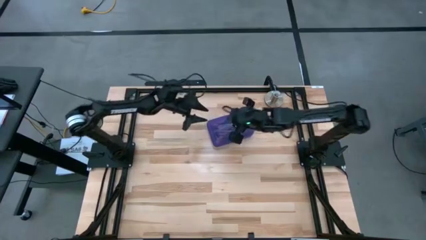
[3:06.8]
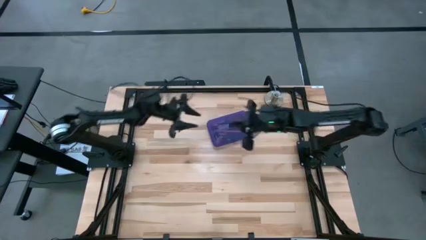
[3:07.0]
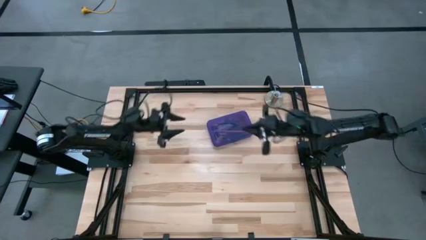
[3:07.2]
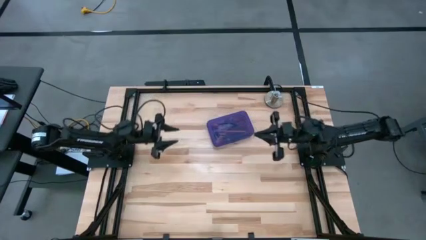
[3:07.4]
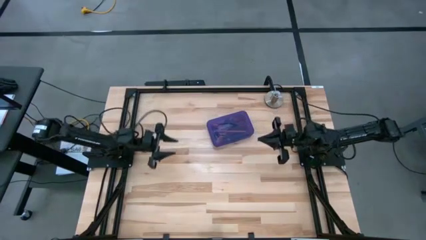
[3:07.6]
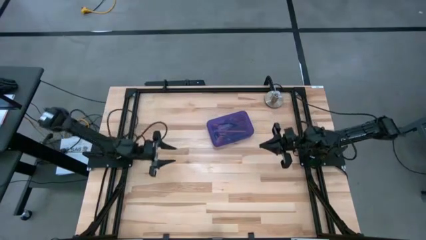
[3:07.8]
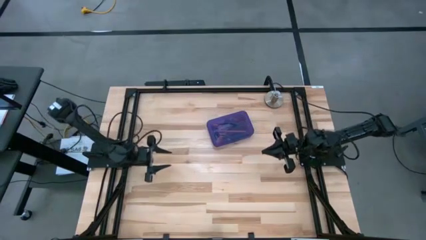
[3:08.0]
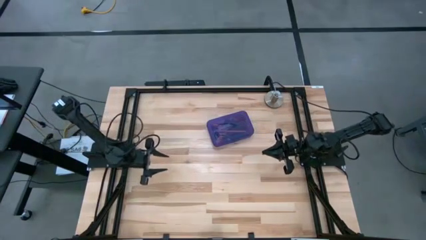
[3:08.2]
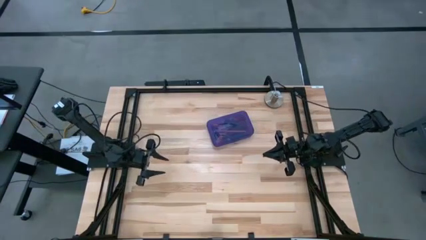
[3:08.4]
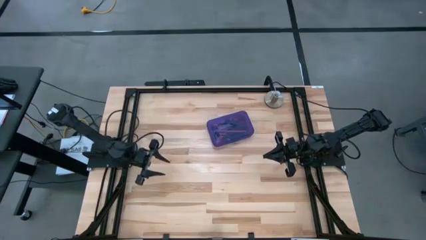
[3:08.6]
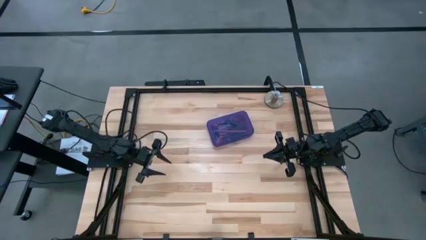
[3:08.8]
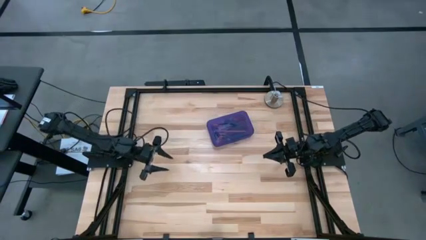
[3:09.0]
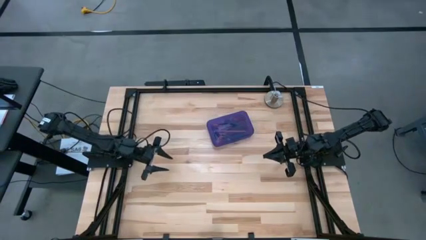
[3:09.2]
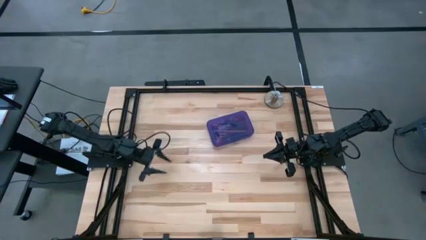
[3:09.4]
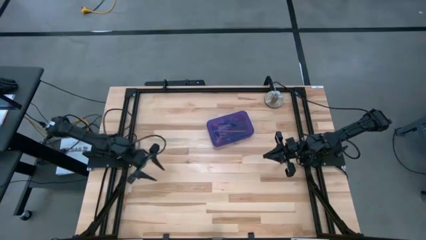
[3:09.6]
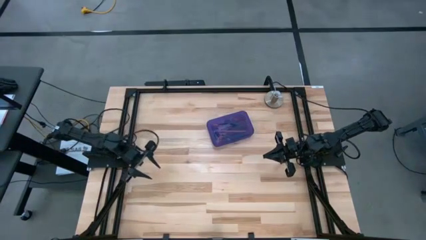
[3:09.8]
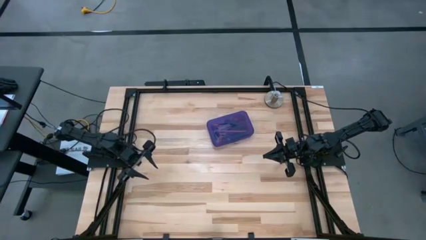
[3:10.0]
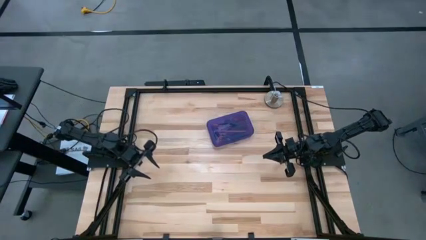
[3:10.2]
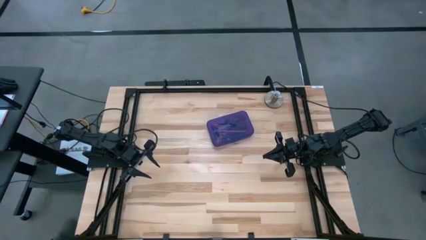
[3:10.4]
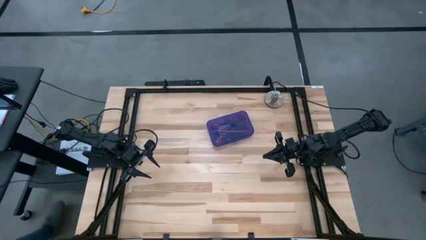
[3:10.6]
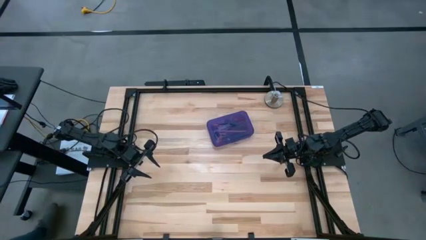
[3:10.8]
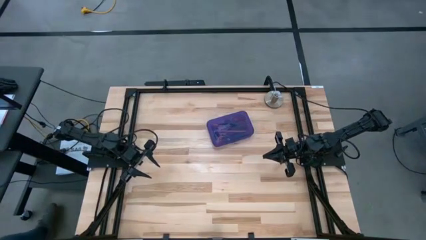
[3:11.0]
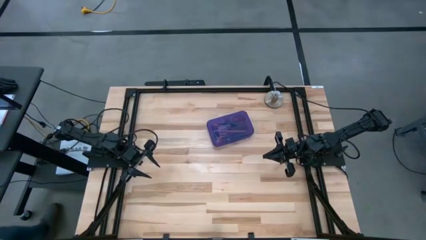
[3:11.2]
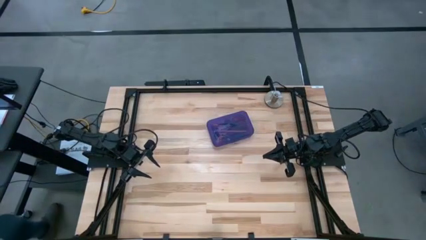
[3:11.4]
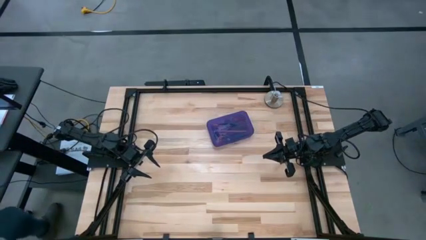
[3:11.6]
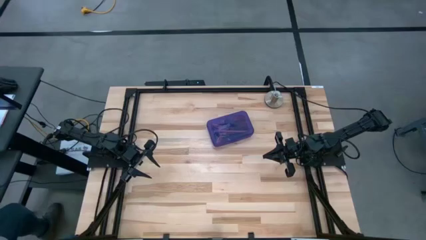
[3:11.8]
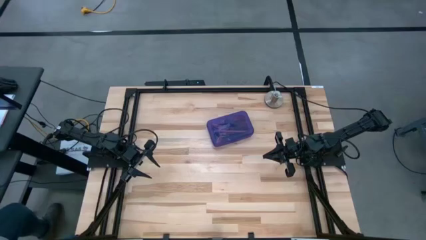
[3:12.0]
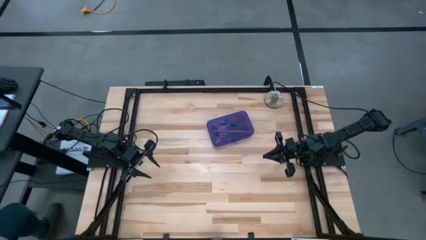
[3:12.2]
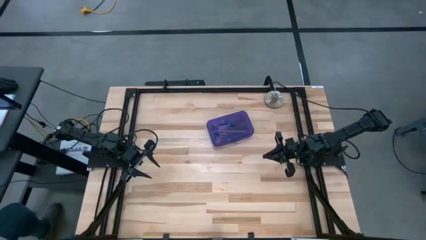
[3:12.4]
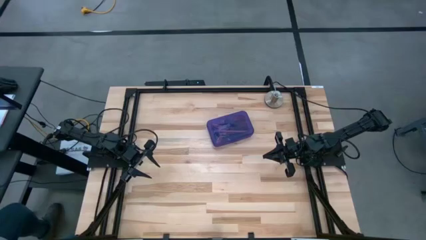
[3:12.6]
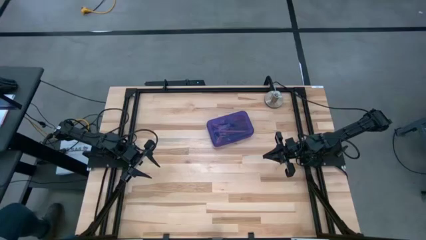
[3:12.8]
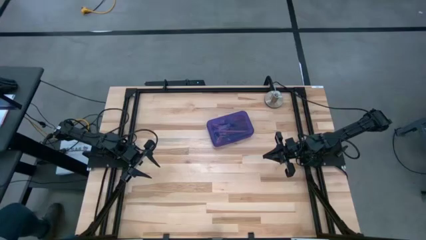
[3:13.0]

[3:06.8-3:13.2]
Task: Pick & place school supplies into a supply box
Return to Home Position

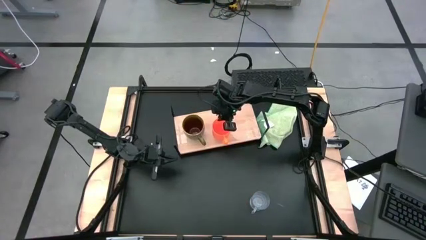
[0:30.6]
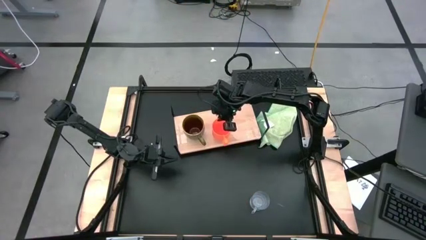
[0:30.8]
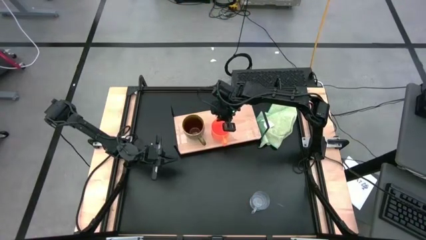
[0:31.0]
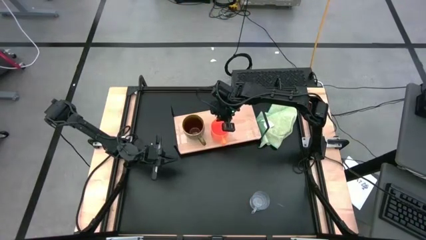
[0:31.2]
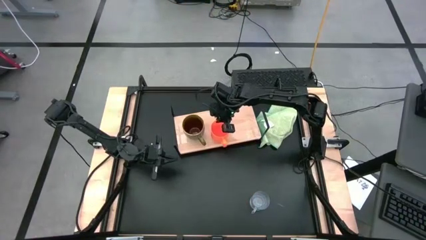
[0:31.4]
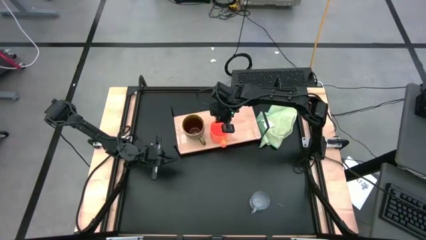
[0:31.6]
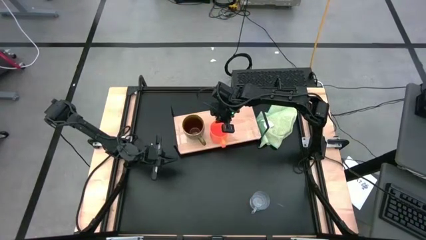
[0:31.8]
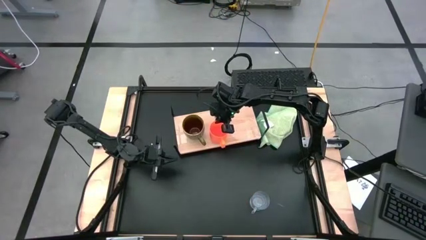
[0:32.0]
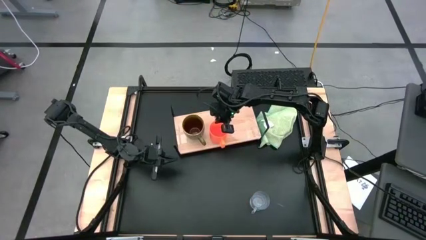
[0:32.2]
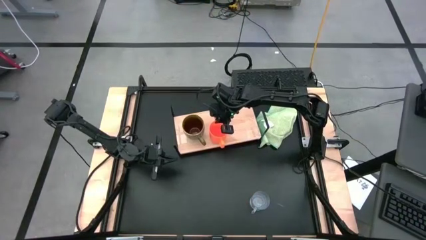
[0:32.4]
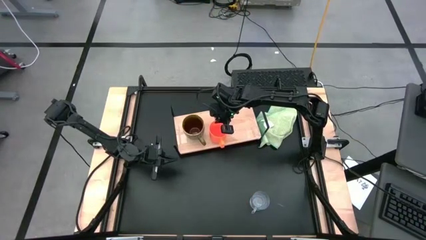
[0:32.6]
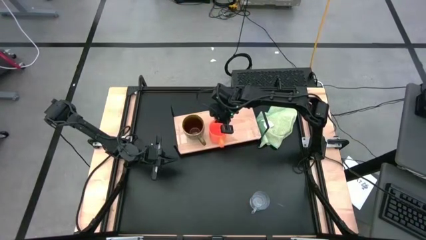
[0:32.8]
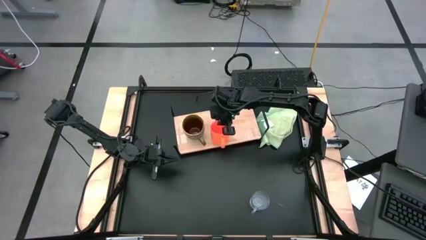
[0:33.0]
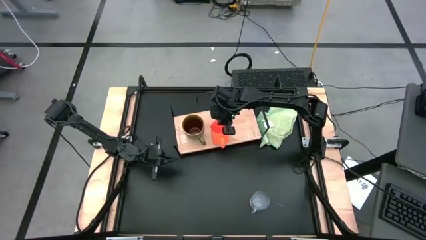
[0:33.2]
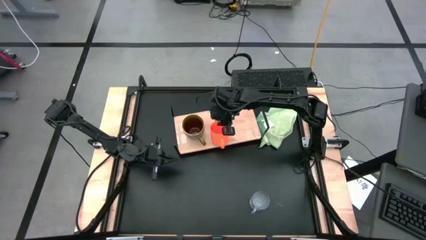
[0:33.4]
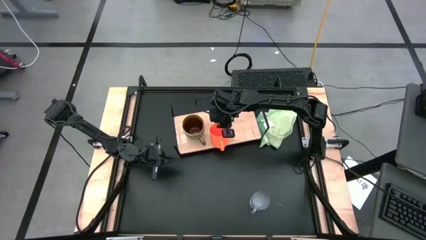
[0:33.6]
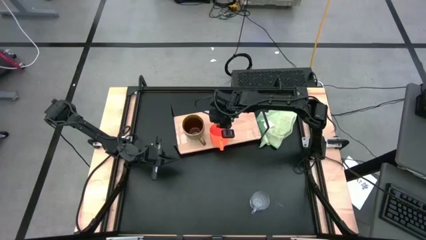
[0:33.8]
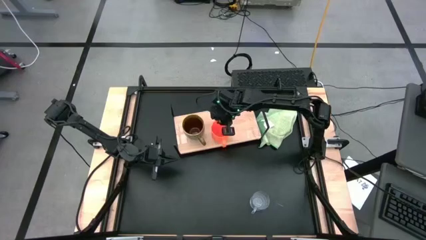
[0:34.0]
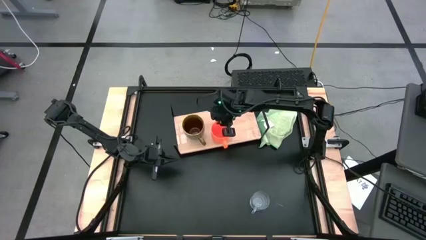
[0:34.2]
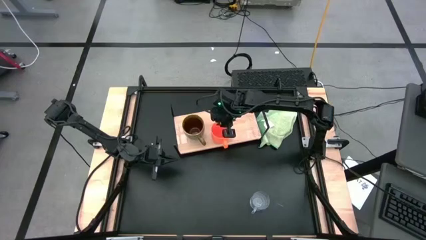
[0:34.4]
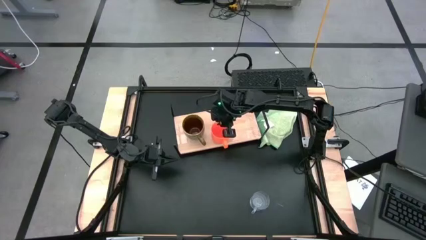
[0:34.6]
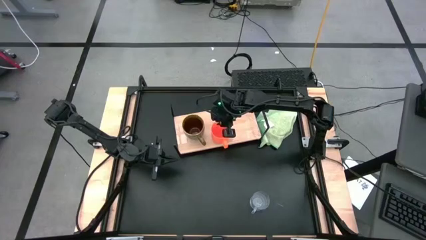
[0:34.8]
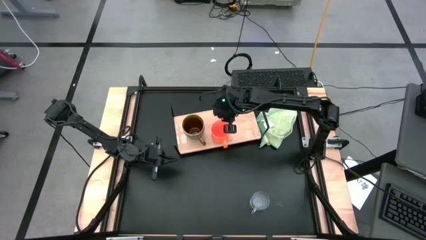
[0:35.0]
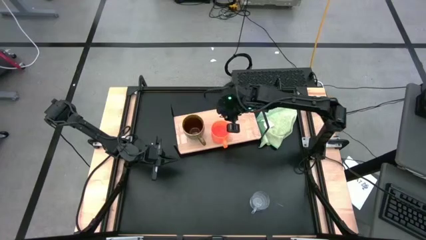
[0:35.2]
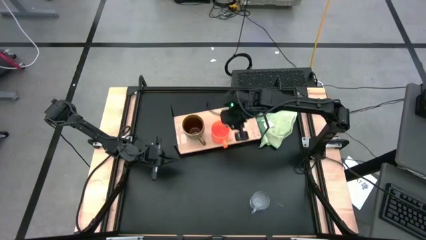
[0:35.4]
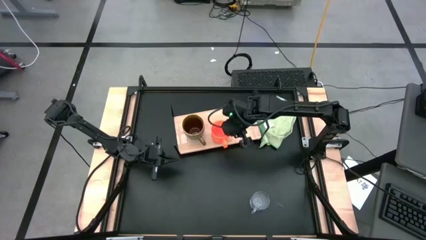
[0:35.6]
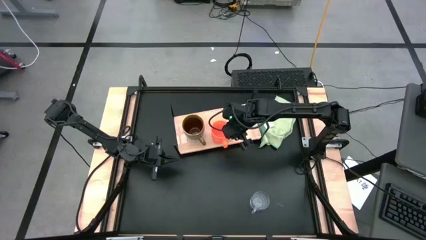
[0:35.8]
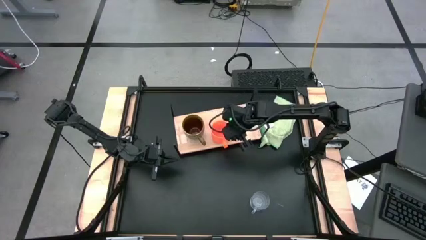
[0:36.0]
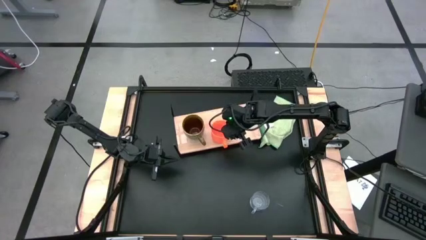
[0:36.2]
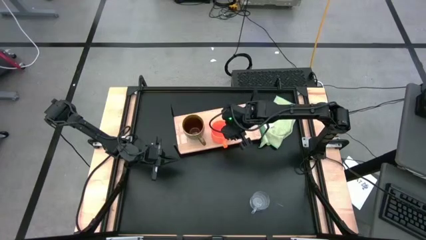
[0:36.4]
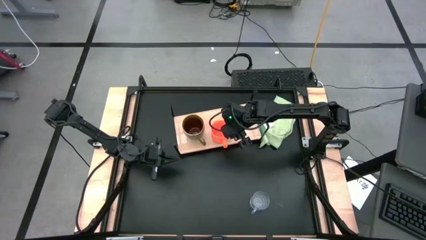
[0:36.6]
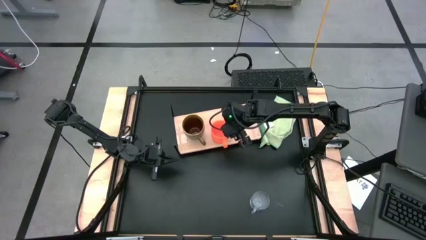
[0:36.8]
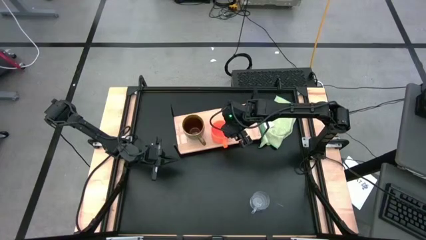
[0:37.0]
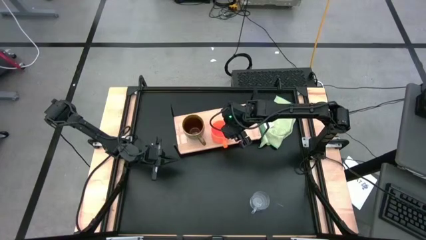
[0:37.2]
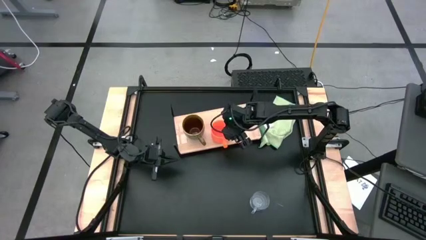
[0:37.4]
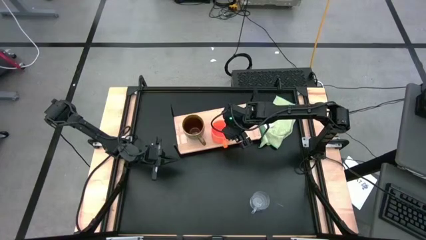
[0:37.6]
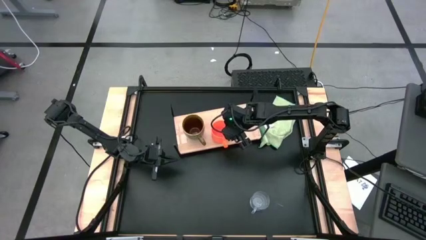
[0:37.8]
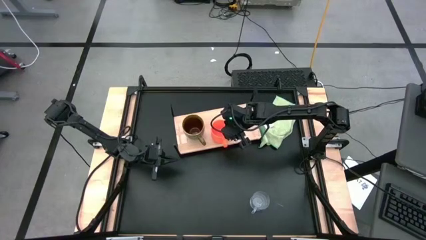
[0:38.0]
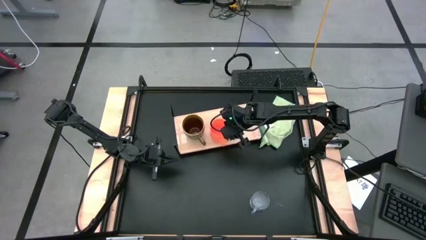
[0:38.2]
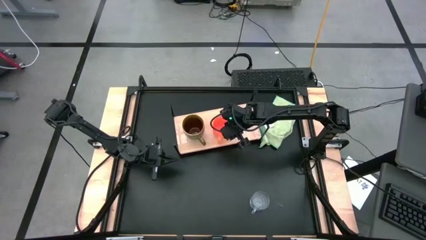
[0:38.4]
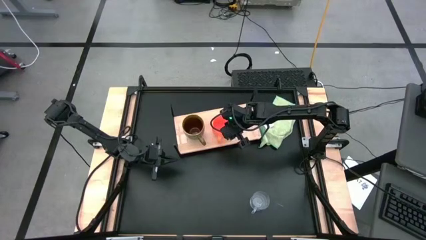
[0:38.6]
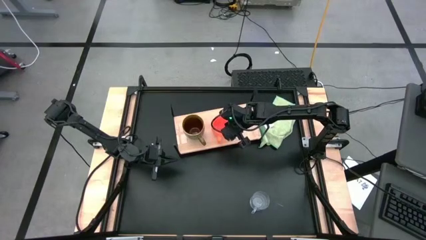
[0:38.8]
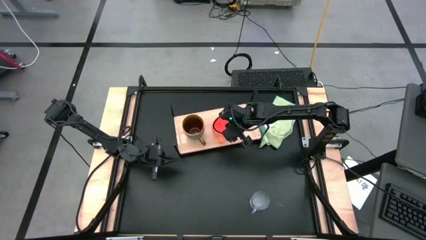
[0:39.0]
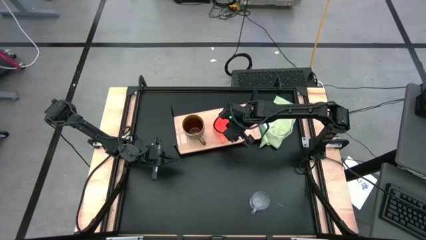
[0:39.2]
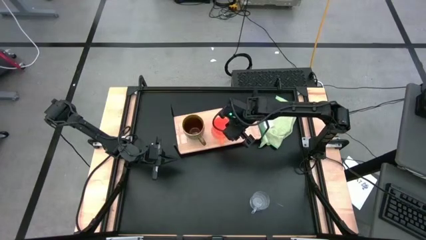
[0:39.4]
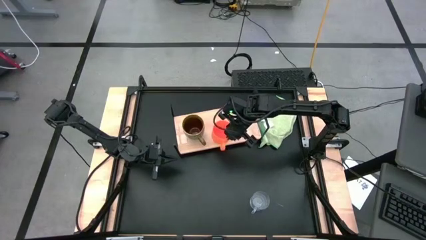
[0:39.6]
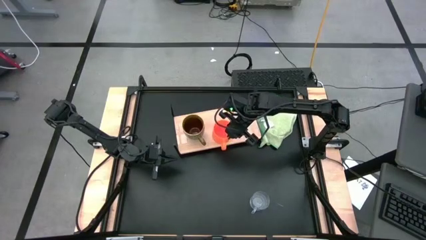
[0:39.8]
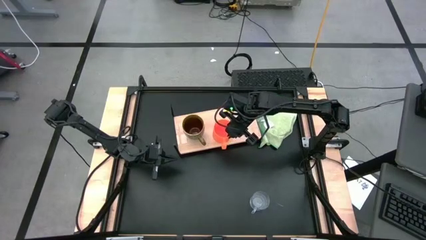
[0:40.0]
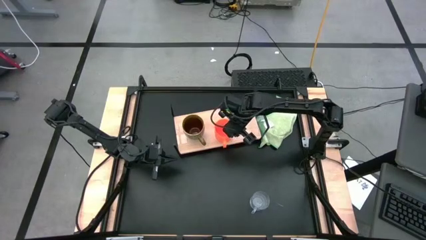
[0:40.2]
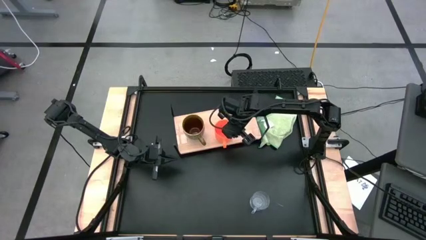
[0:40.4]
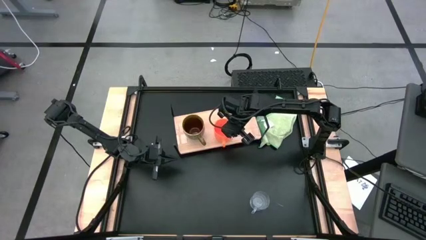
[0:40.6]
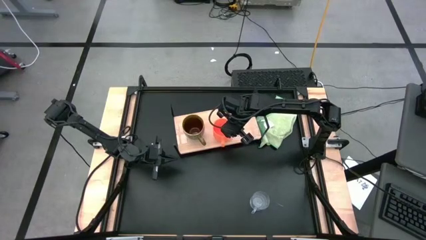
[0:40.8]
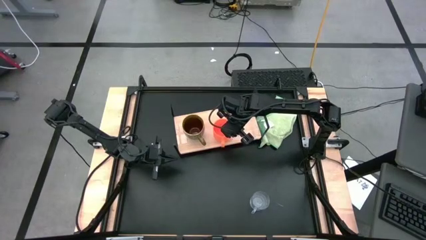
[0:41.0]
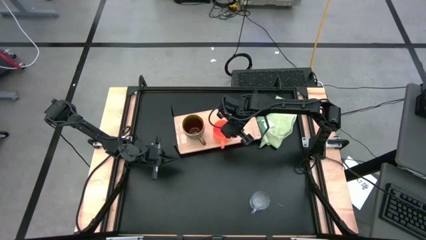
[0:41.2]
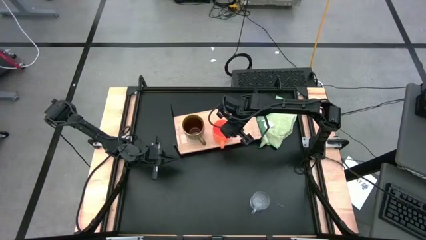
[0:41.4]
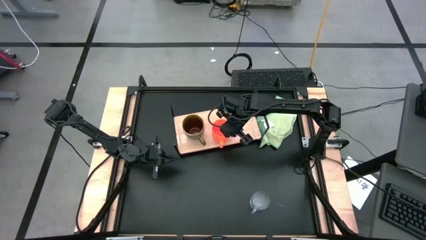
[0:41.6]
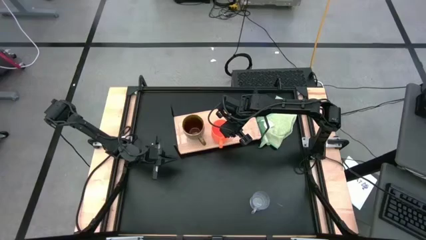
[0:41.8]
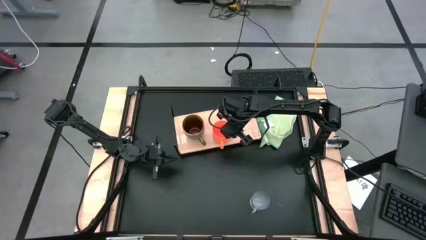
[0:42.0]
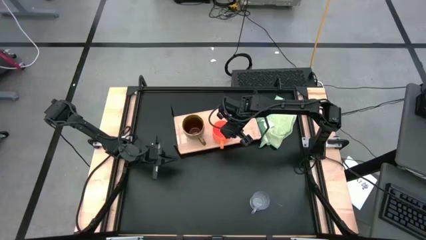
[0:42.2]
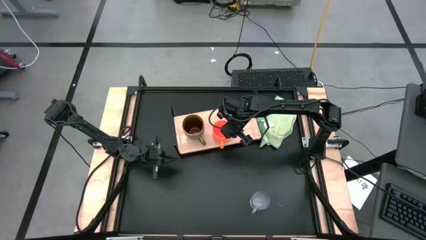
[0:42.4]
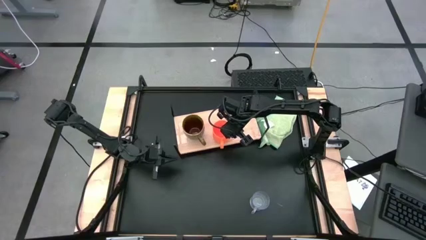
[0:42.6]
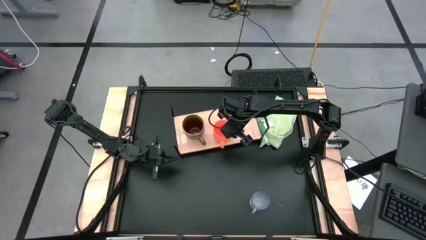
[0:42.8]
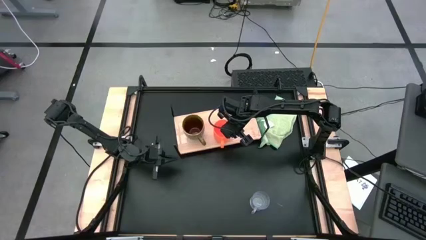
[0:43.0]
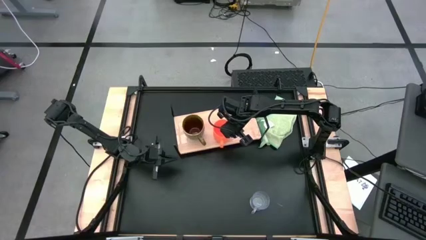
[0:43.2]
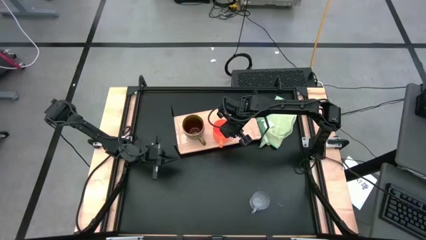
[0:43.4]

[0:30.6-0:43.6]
Task: Stack small to large cups/mugs on shelf
Put the orange mug on the shelf
